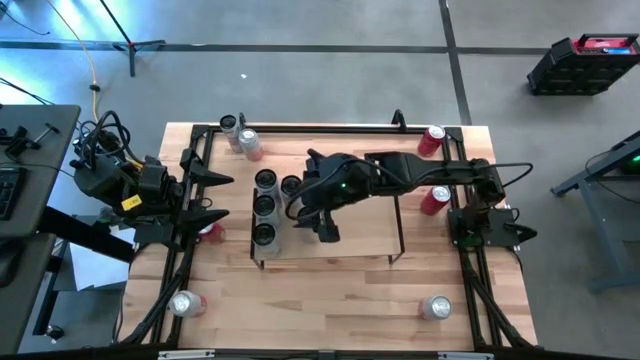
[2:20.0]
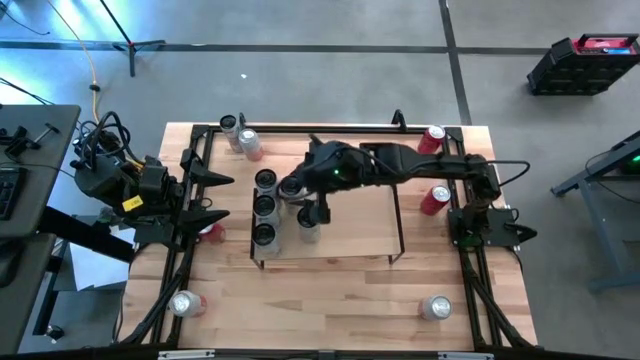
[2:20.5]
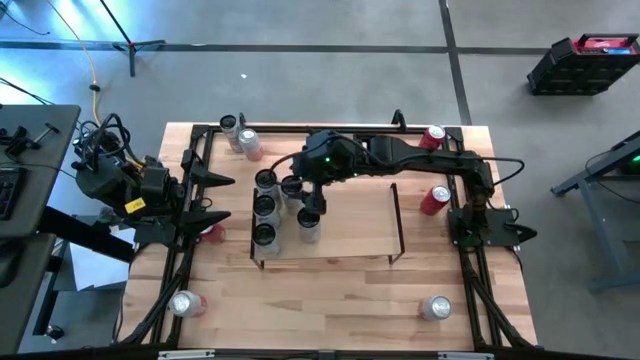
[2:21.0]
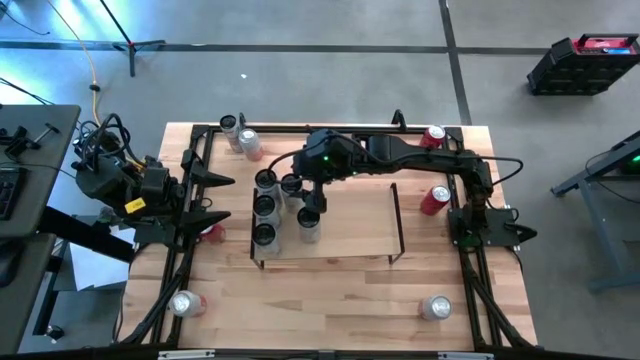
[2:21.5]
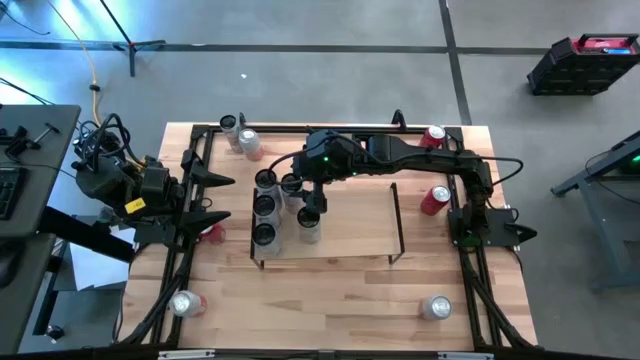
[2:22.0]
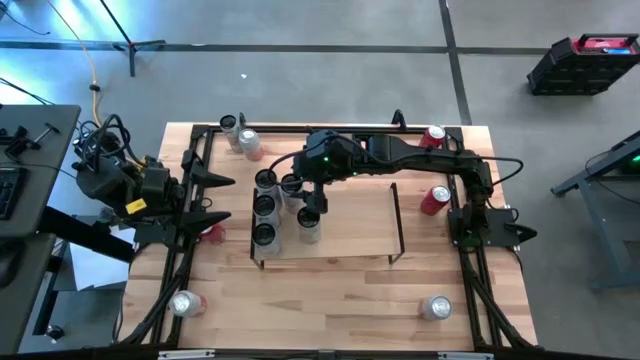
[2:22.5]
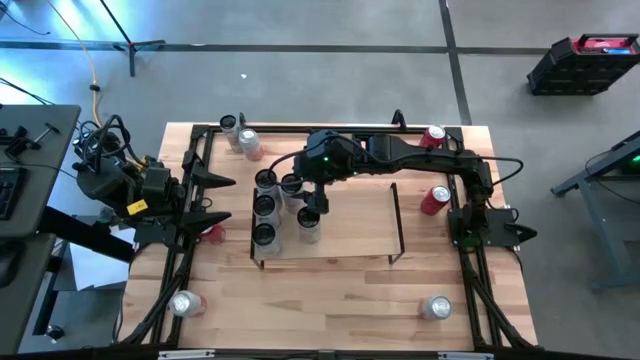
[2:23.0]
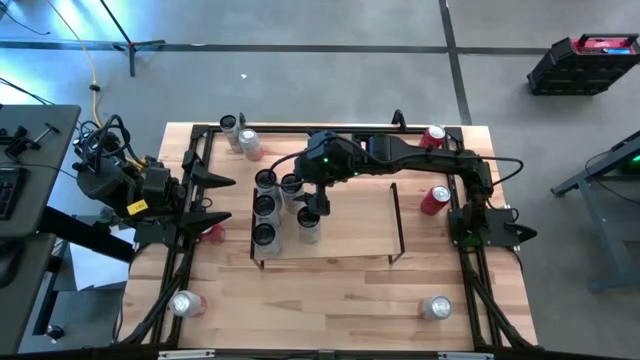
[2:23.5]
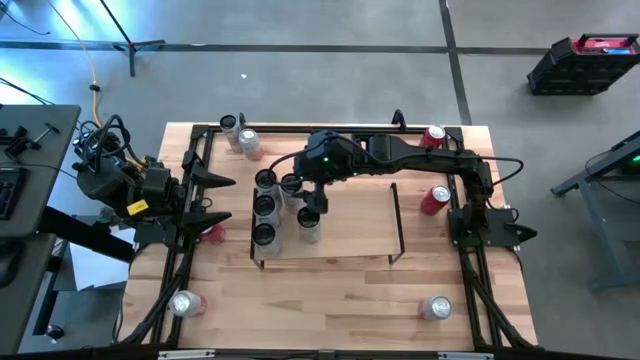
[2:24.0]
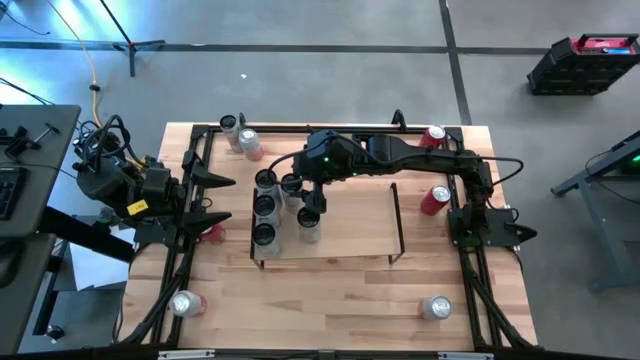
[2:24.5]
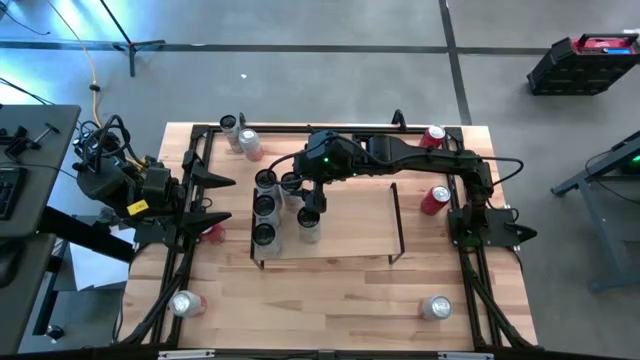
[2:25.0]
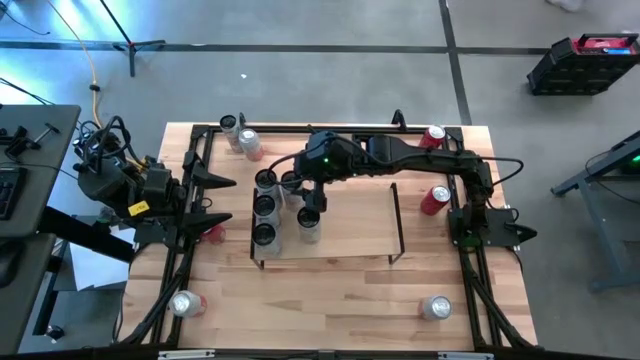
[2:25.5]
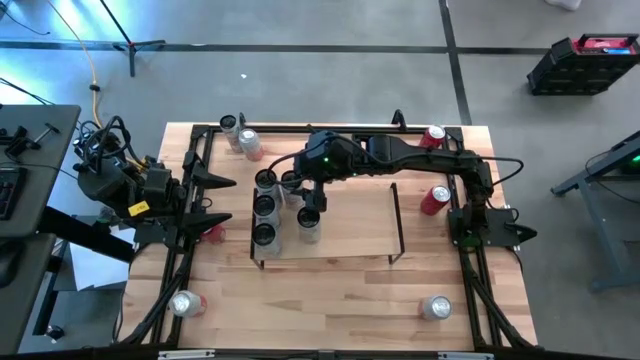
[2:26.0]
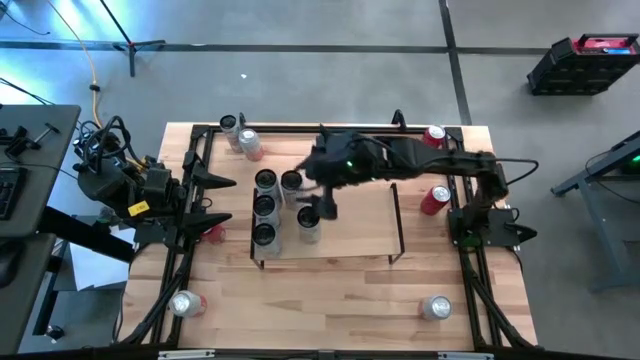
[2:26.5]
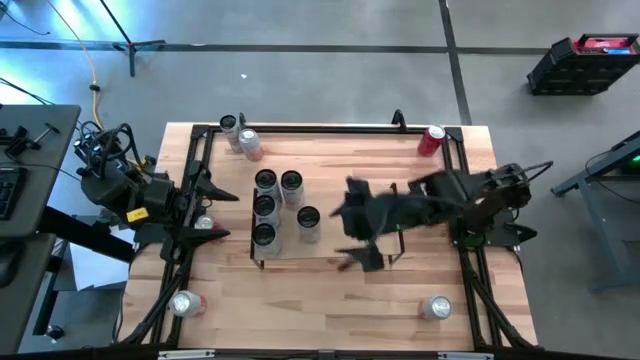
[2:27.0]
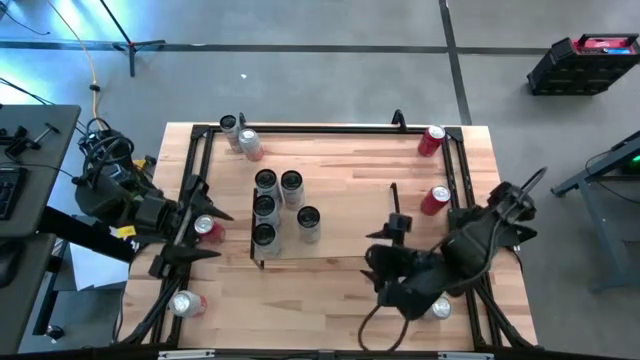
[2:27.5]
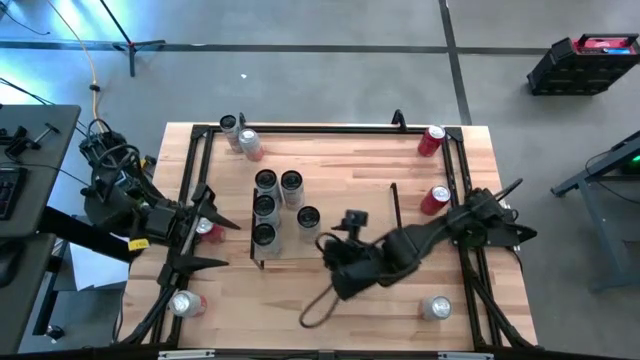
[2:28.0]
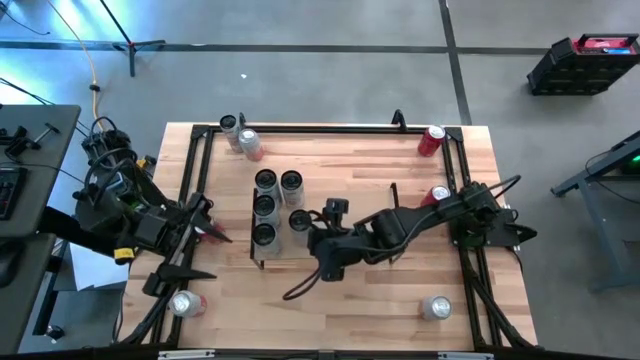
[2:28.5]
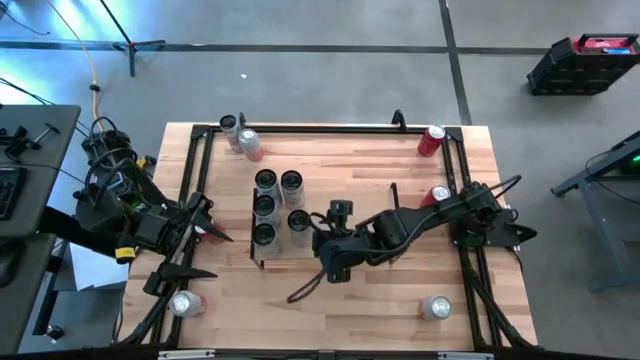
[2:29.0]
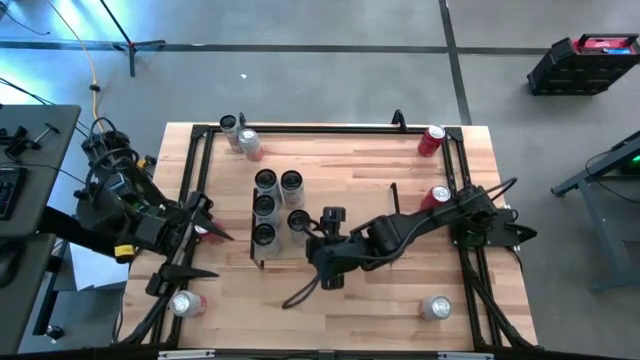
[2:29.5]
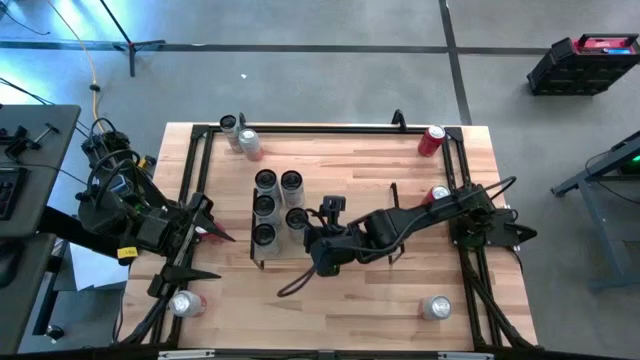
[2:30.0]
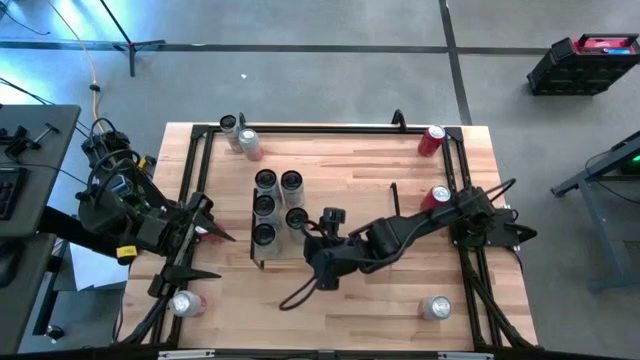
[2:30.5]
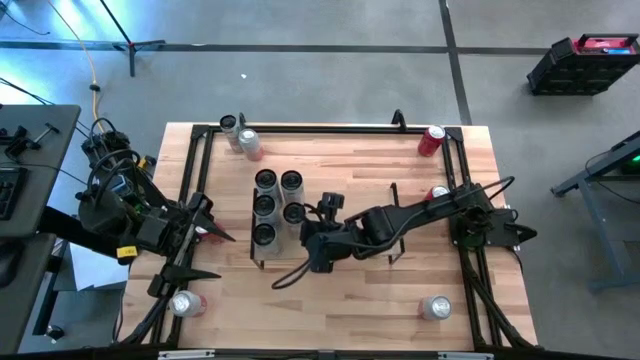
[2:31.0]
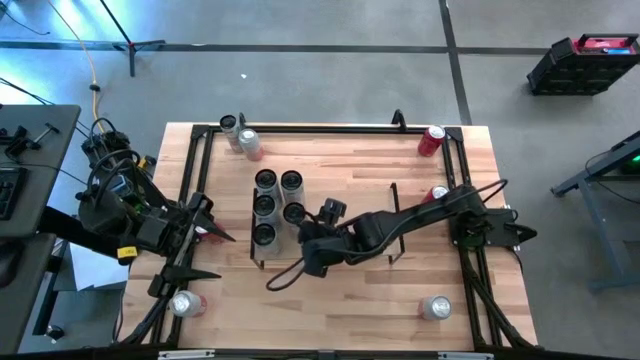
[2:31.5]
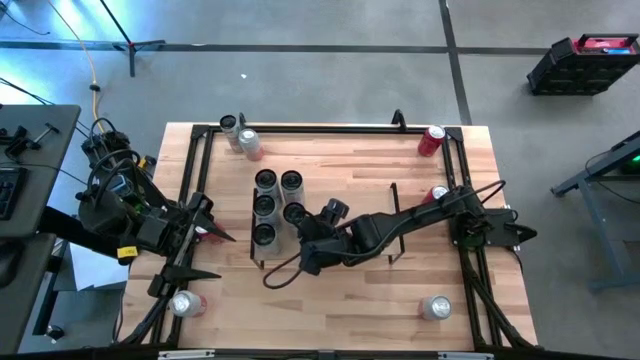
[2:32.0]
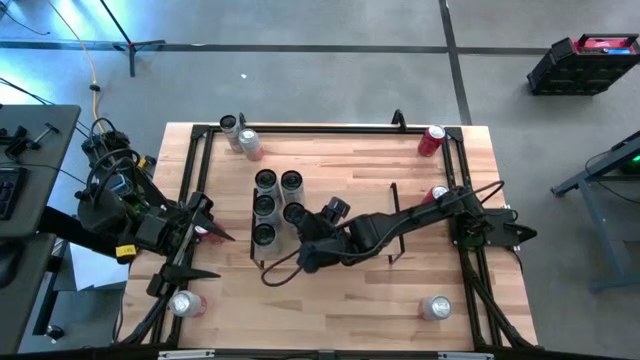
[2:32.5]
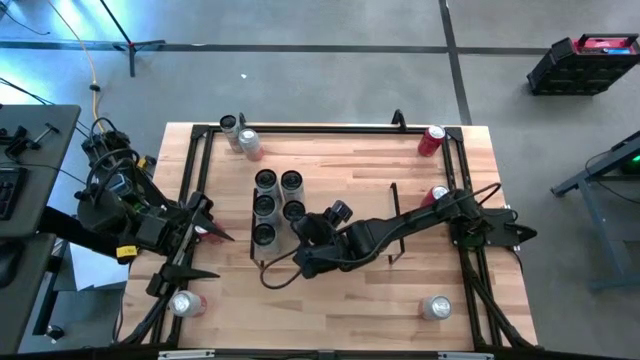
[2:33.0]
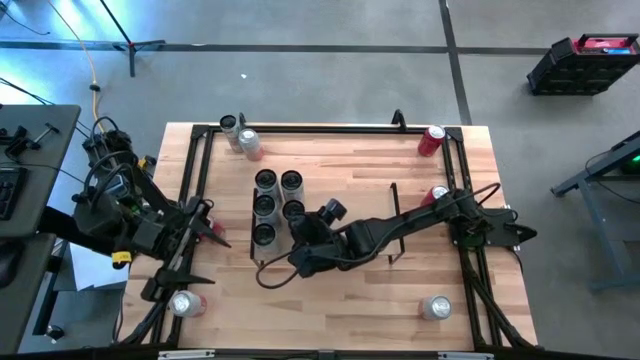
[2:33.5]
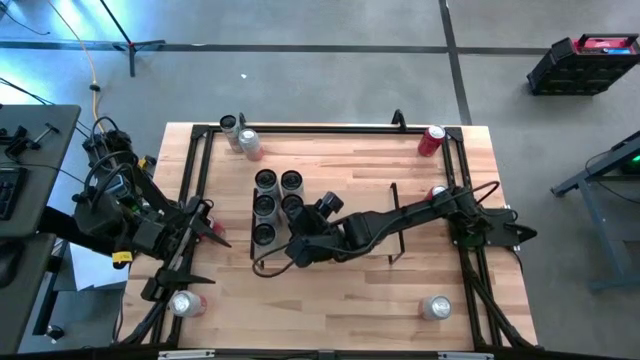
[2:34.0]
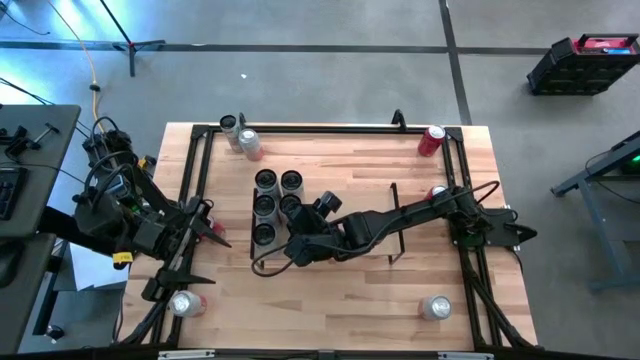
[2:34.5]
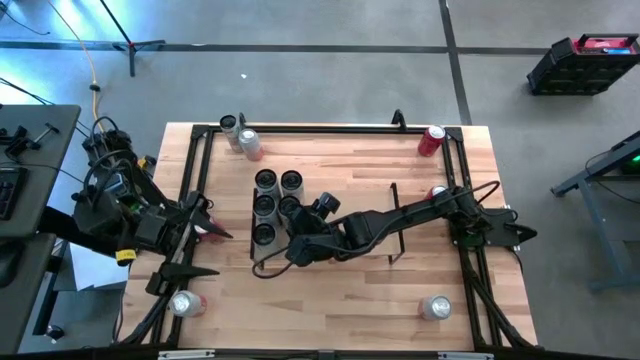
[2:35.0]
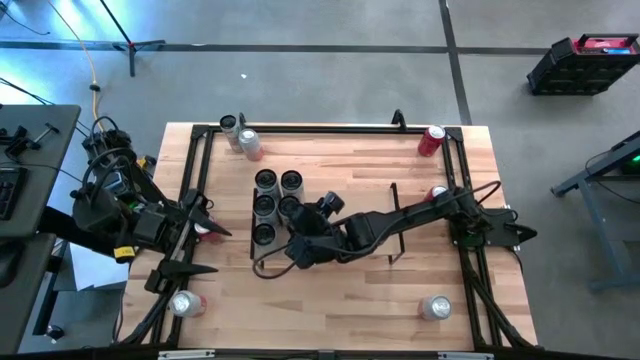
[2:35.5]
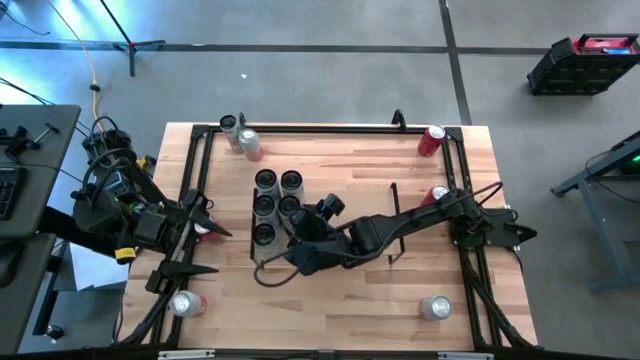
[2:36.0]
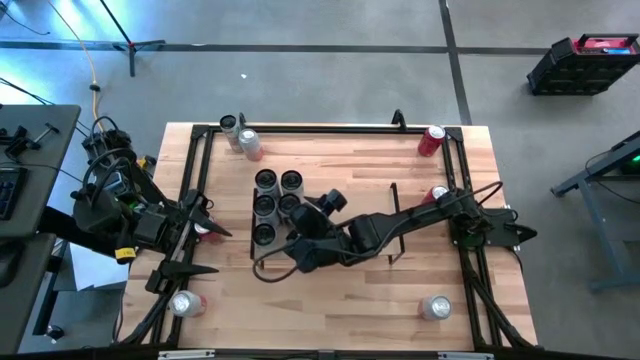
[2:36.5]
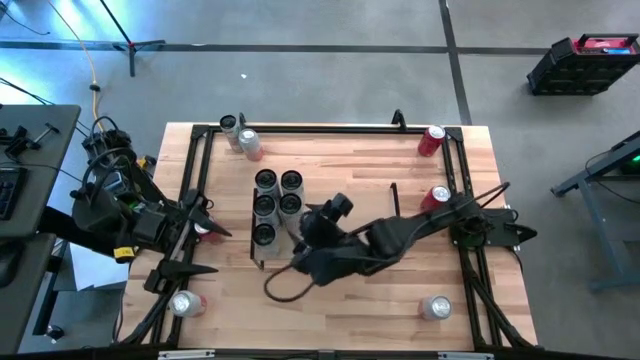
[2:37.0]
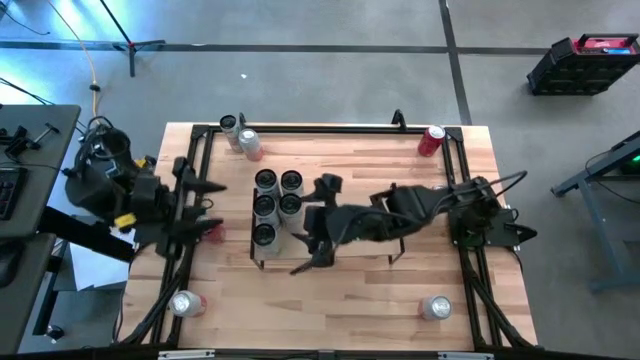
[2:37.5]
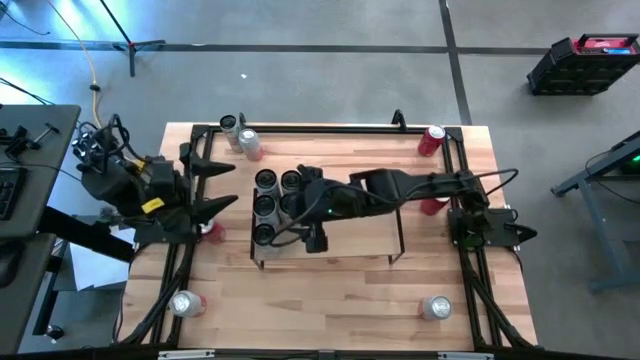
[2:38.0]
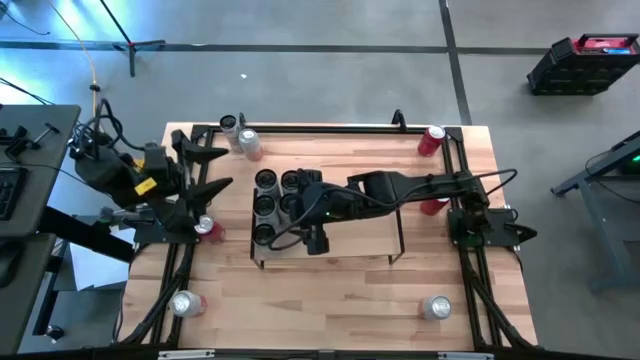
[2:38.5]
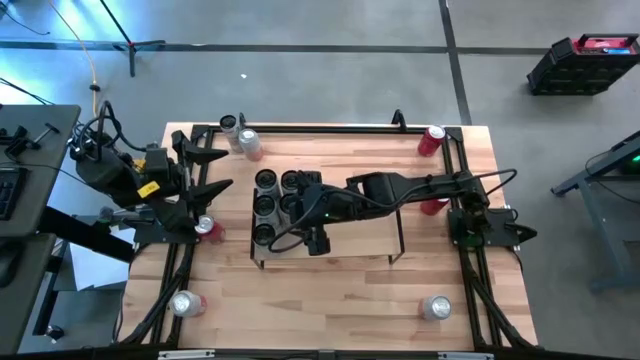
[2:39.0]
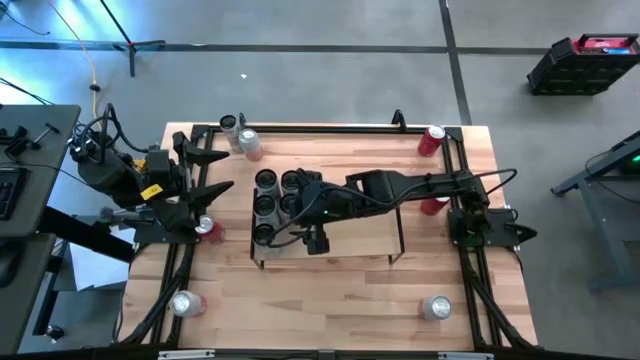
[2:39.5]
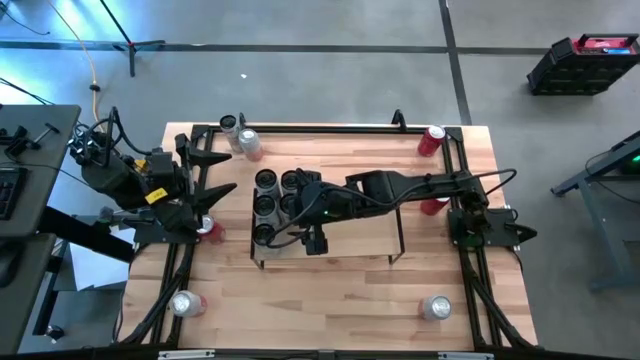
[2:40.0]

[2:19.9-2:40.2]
Task: Place canned beverage on shelf
Adjust the white pink soda cans on the shelf

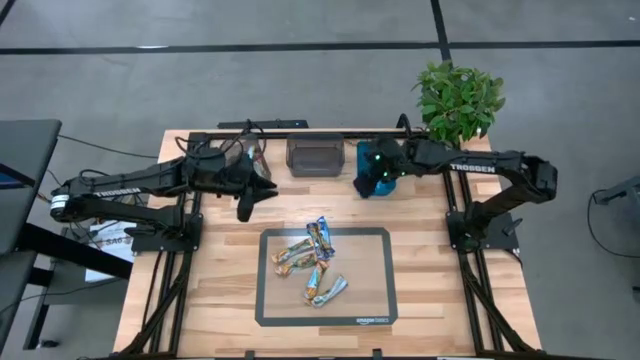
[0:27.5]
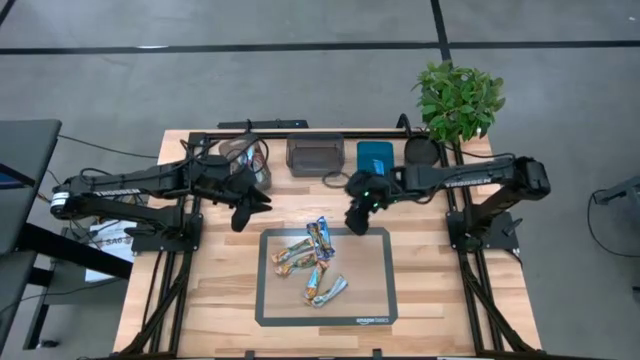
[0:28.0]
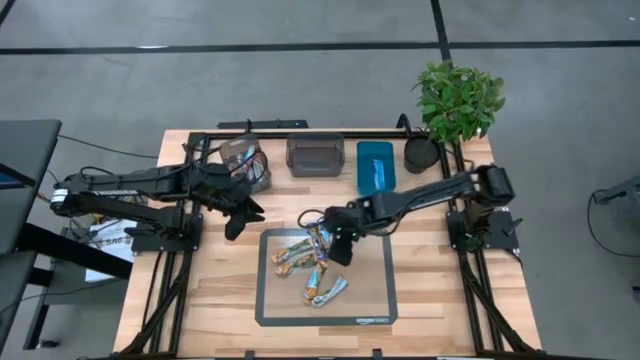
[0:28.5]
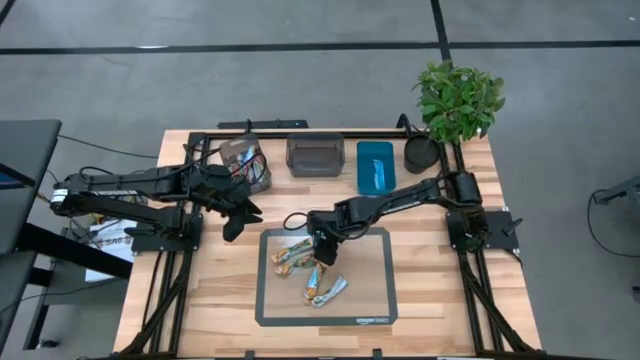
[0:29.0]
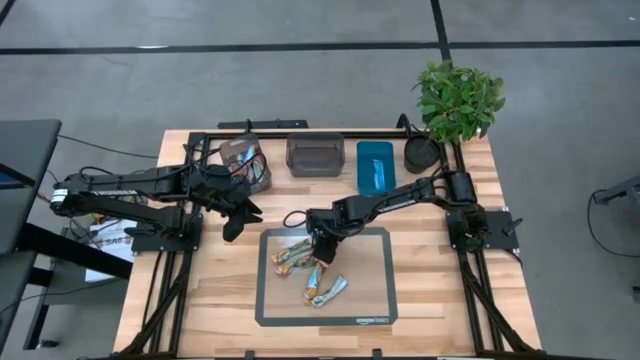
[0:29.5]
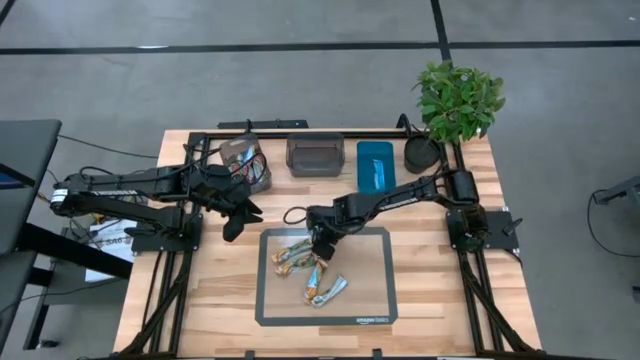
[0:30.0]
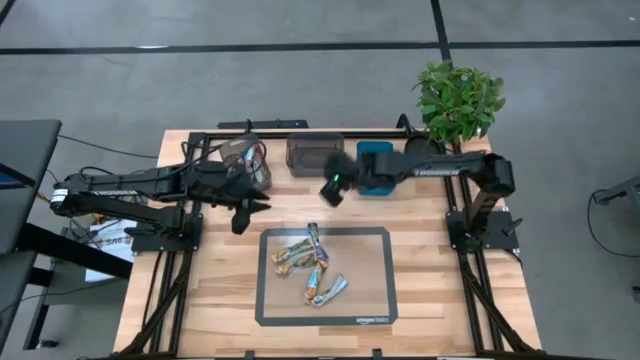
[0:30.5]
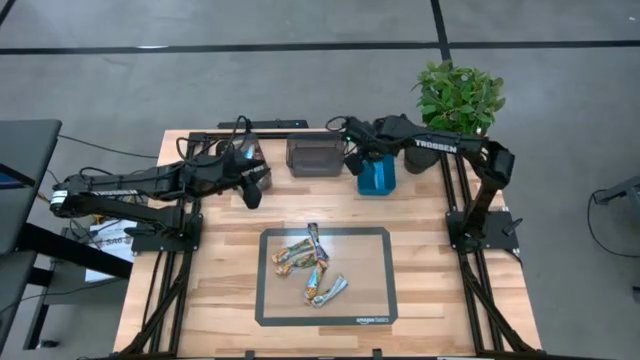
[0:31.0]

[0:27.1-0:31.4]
Task: Pick and place Granola Bars by type
Put the blue granola bar into the blue bin
